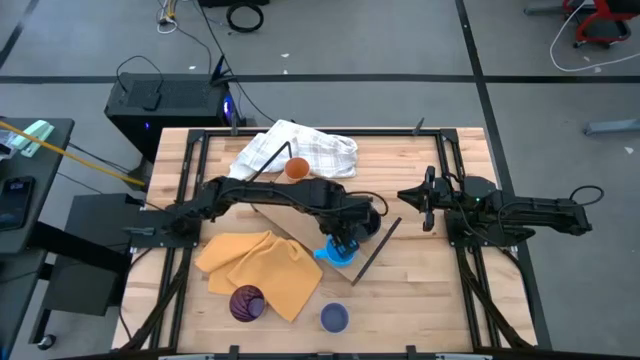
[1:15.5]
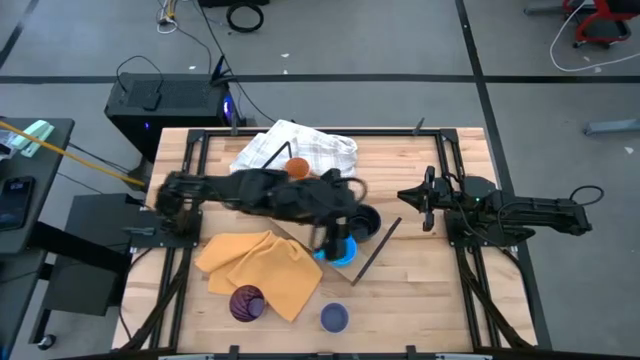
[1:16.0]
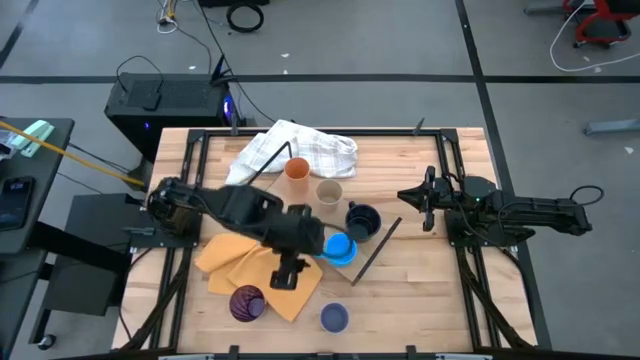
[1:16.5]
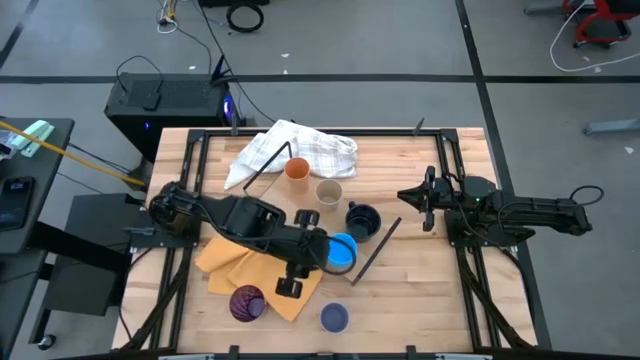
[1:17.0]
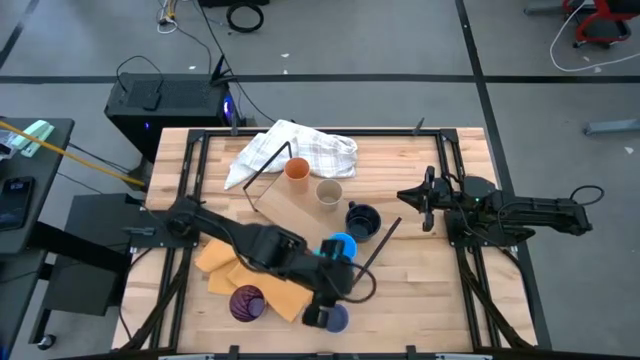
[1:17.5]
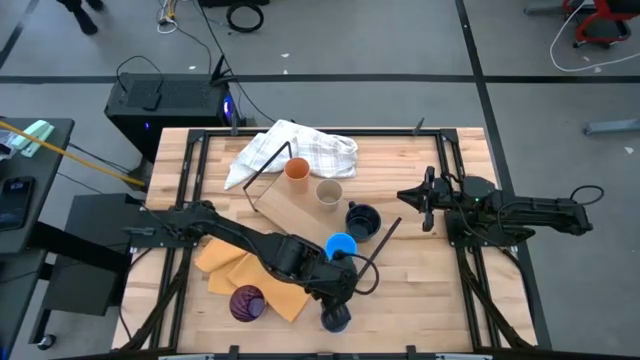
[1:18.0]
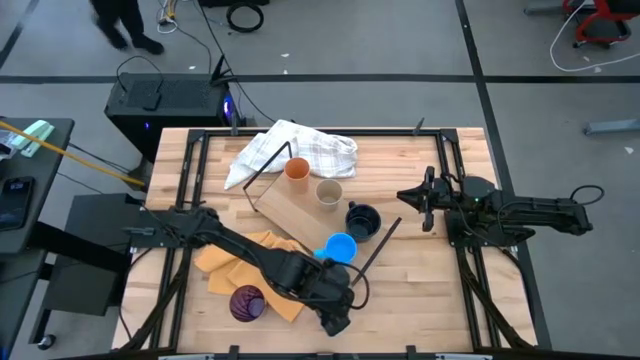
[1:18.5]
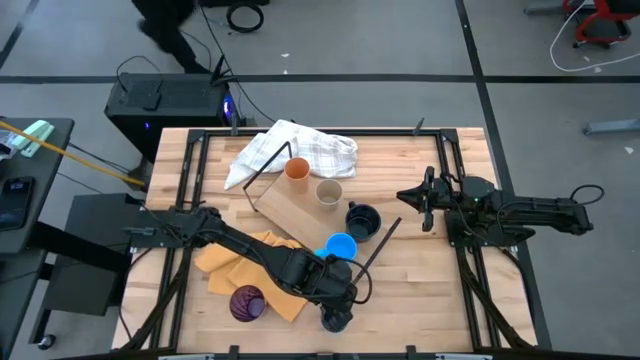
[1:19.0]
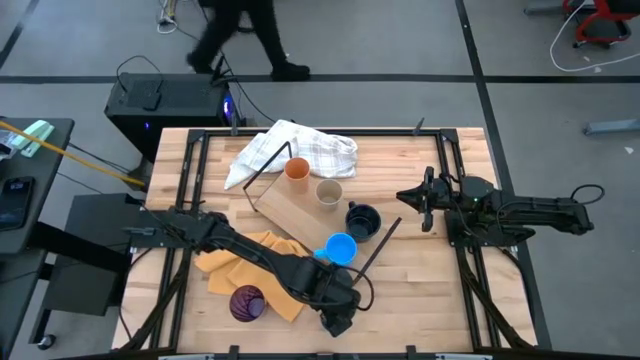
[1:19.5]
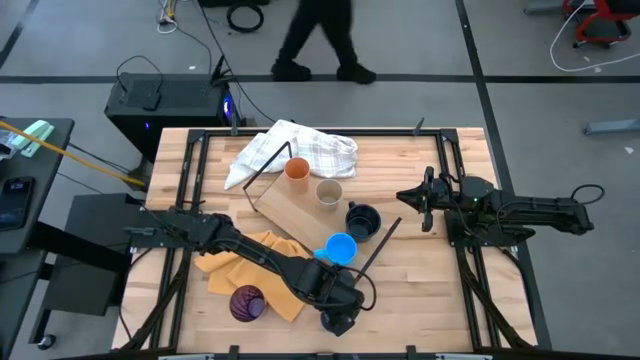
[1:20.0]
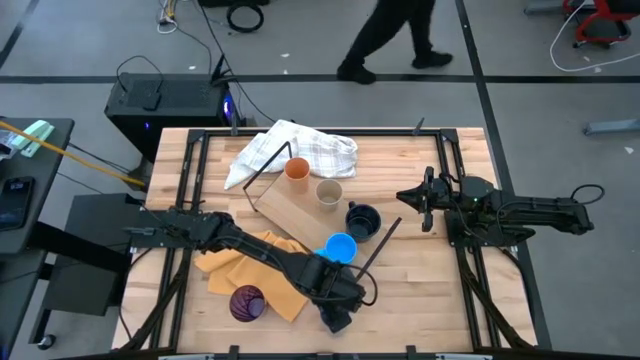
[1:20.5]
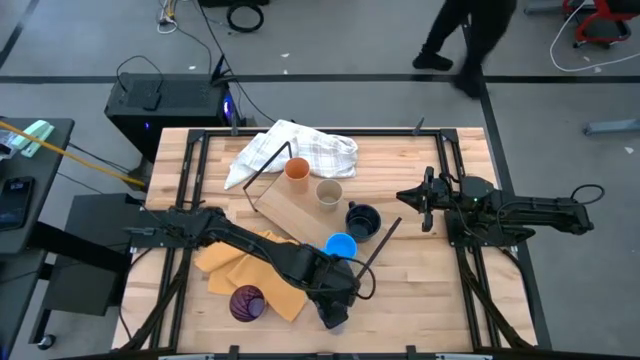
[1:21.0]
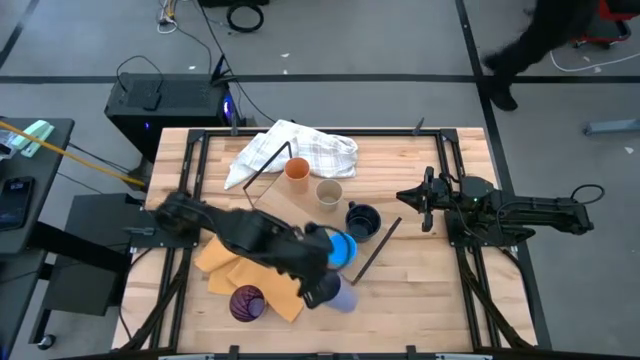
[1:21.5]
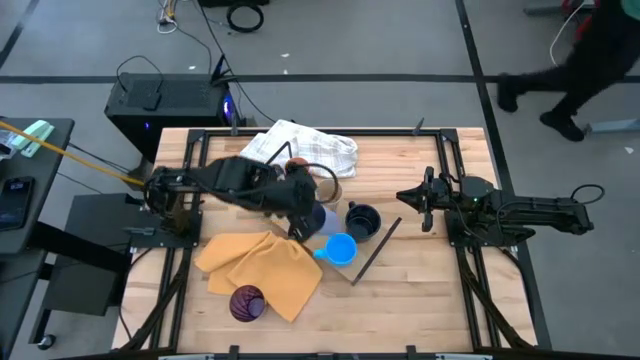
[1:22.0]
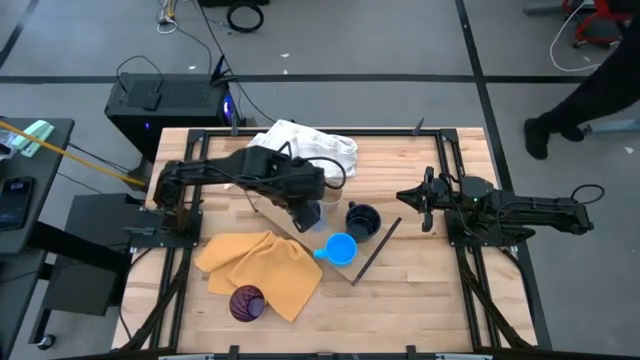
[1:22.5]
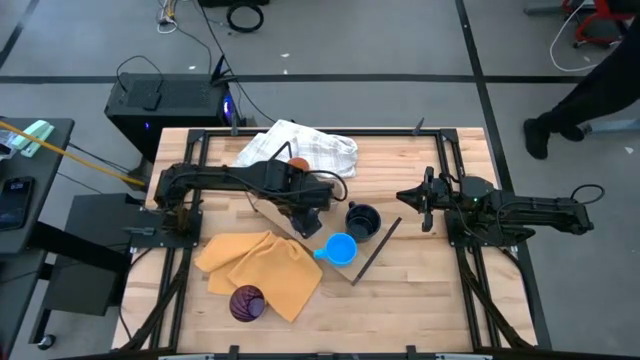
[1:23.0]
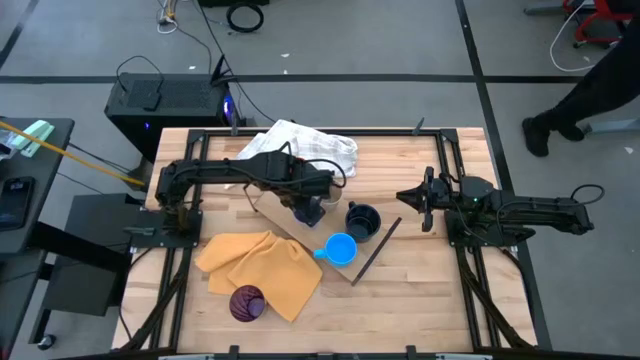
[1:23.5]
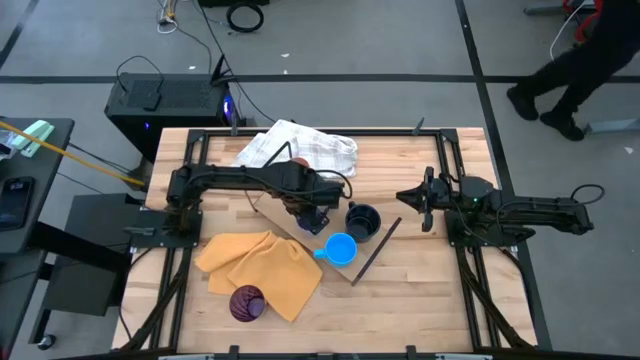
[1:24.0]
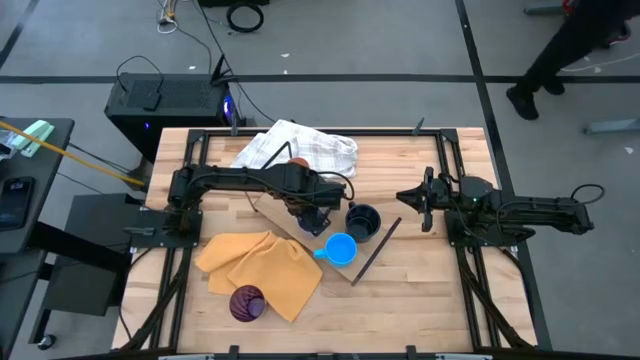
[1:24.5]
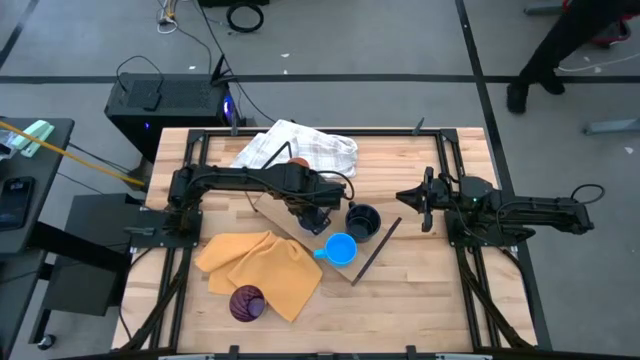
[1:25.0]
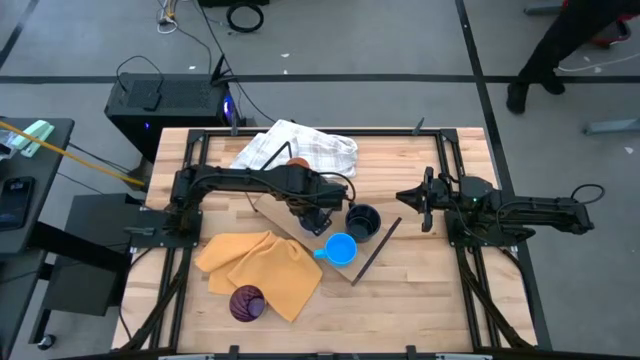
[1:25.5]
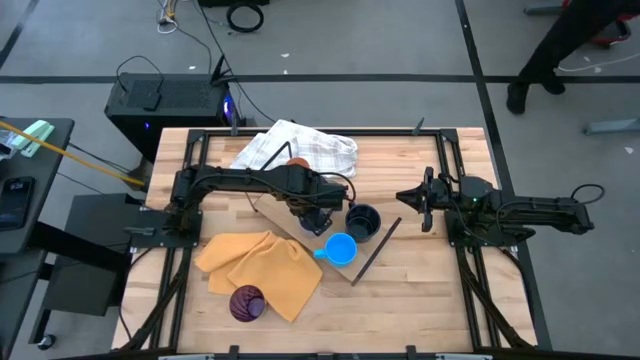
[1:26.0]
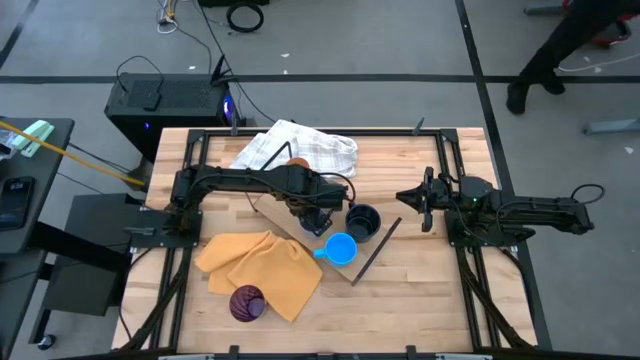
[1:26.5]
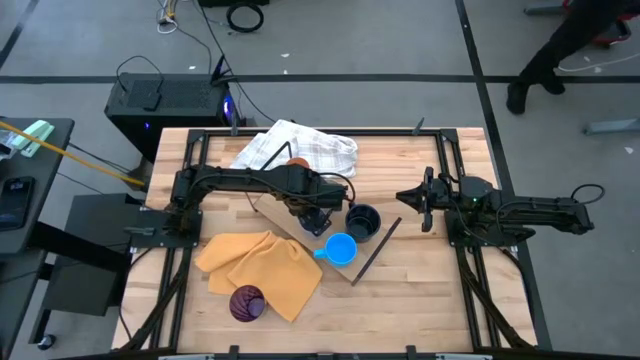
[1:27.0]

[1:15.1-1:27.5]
Task: Stack small to large cups/mugs on shelf
Put the purple cup on the shelf

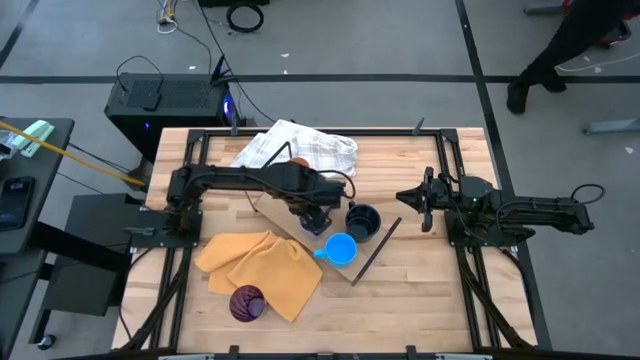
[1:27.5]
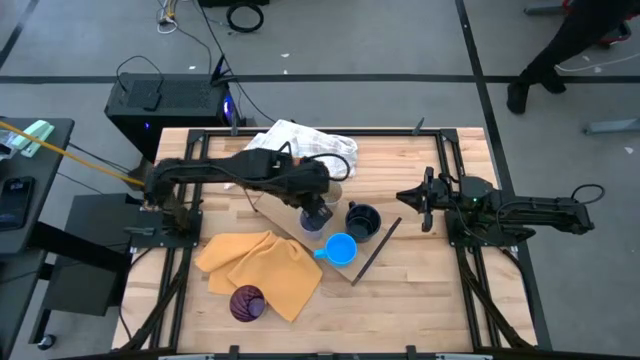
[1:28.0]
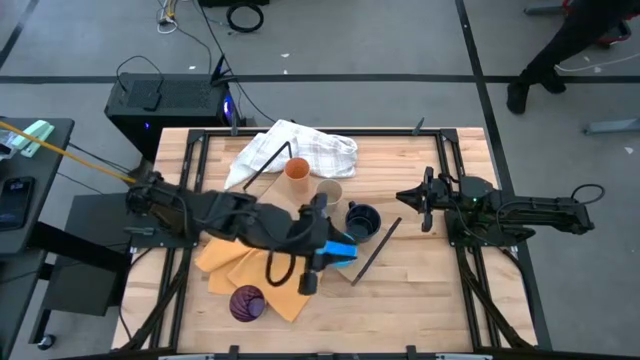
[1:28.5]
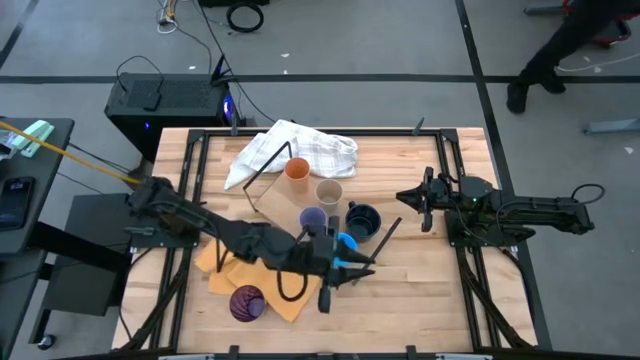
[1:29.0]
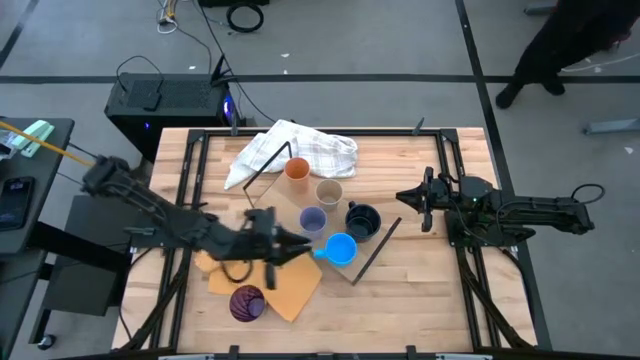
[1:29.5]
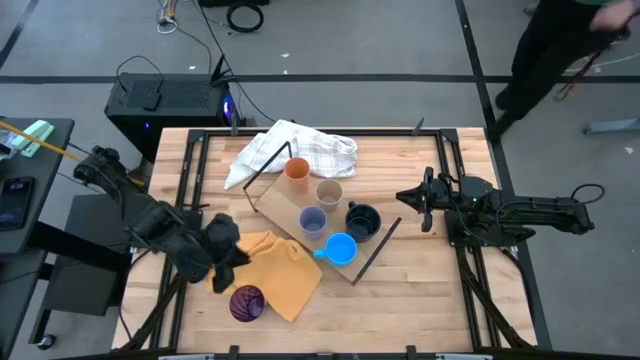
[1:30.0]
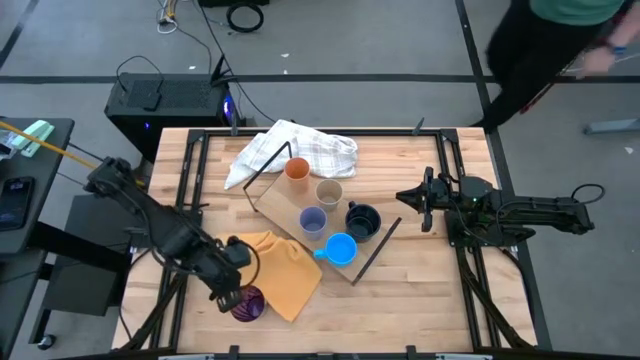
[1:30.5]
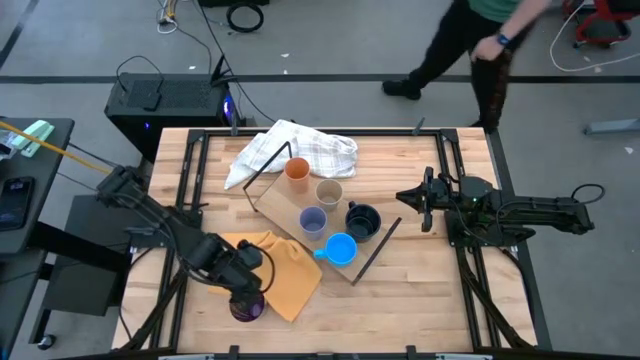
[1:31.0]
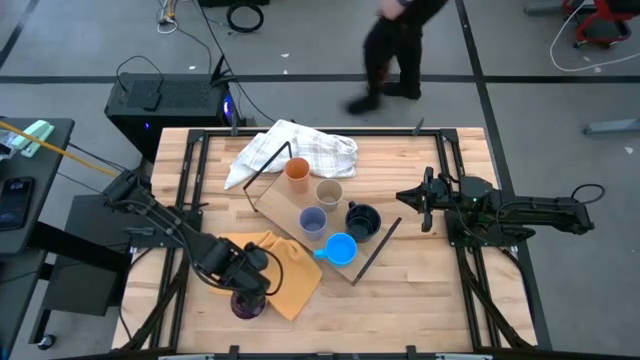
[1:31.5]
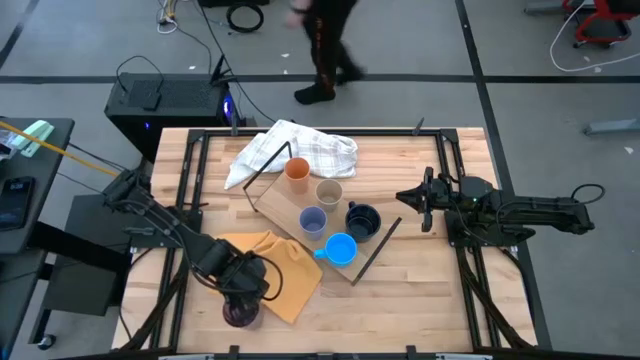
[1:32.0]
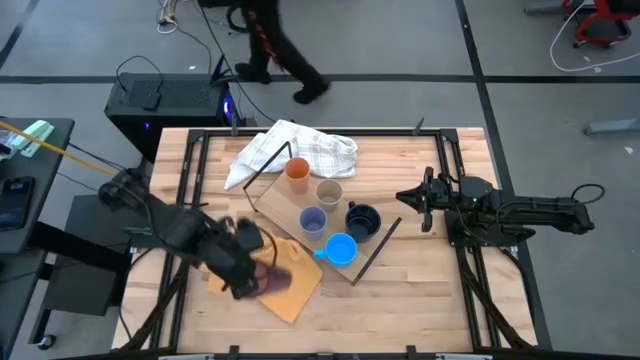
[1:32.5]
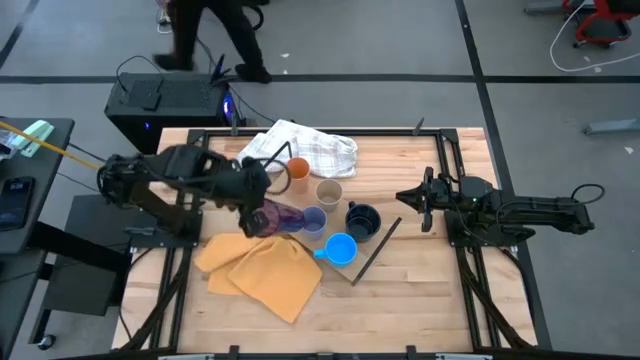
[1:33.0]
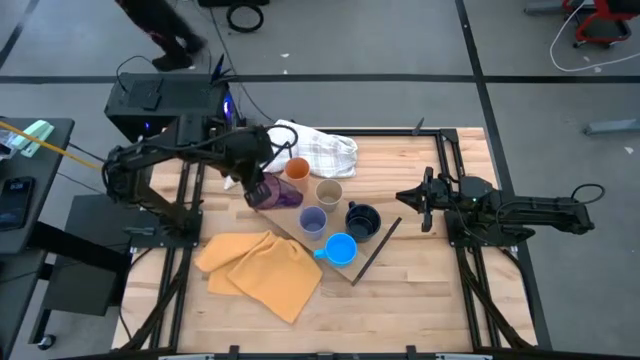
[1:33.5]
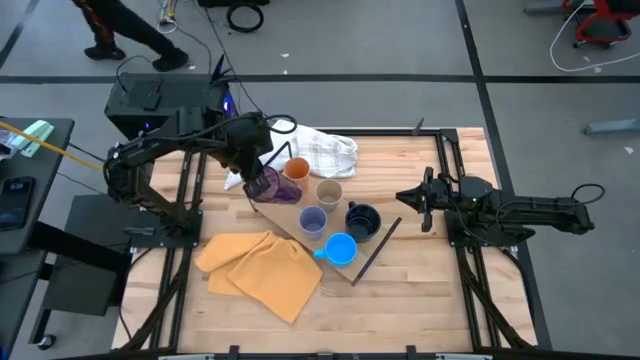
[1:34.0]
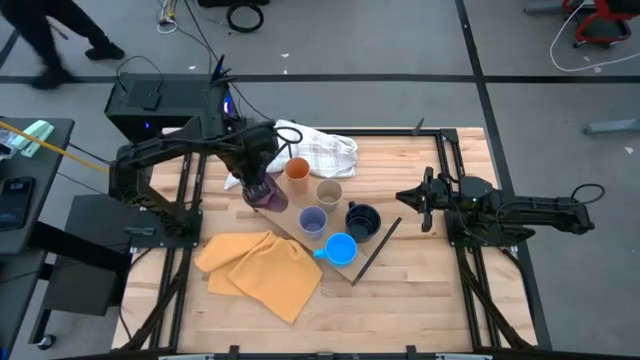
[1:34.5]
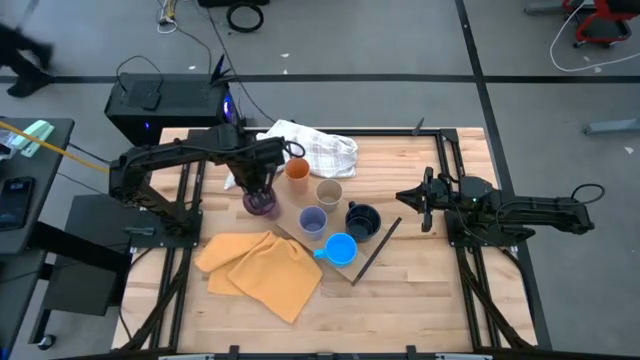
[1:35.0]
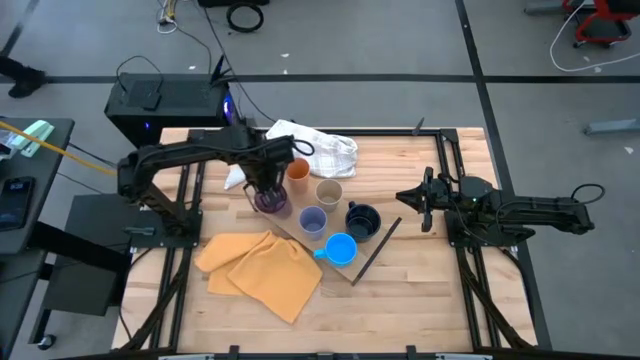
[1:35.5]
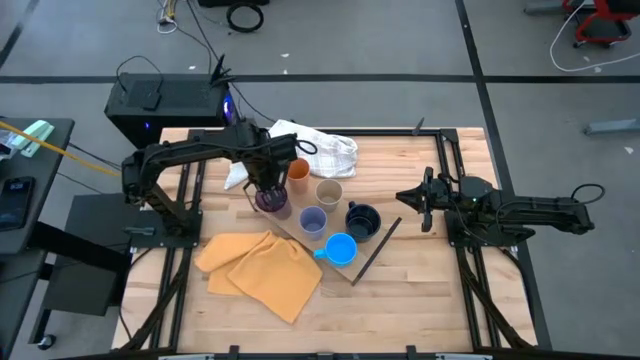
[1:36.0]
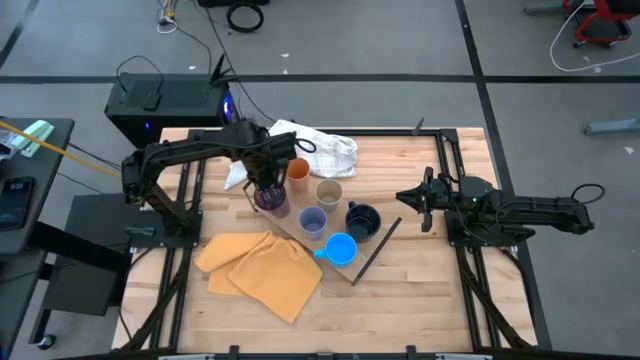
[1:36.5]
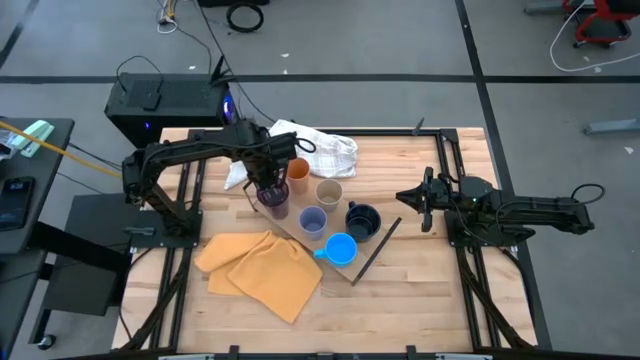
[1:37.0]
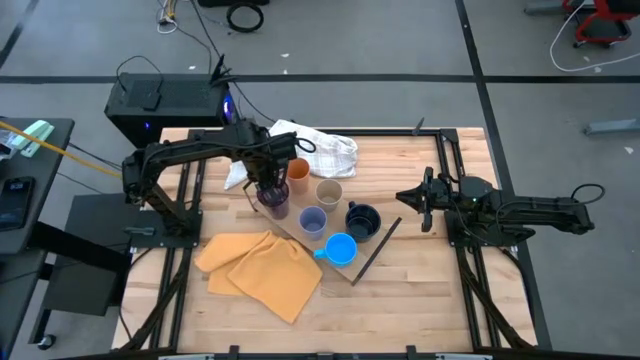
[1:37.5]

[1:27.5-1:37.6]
Put the violet glass on the shelf
